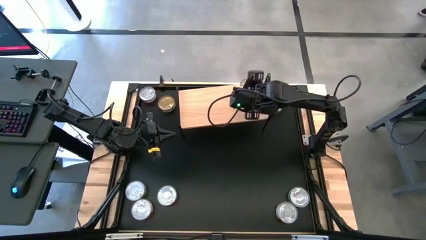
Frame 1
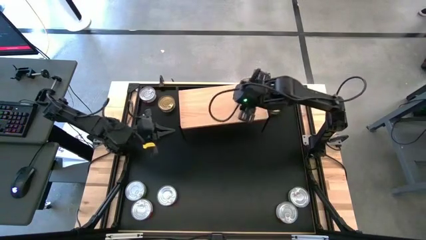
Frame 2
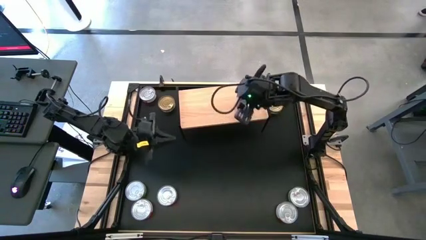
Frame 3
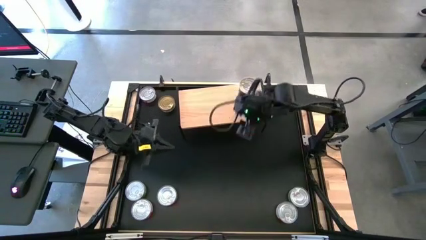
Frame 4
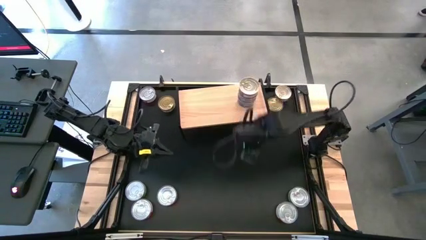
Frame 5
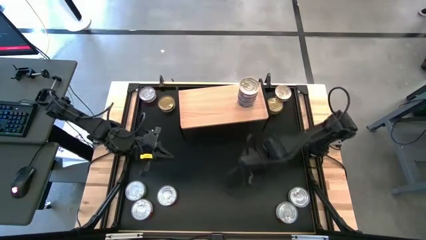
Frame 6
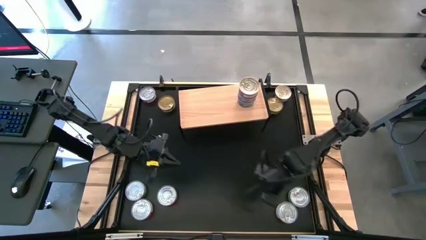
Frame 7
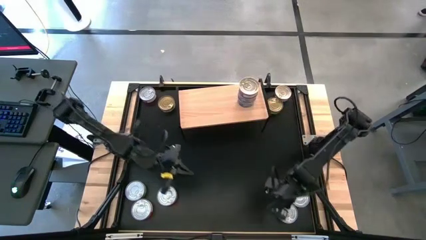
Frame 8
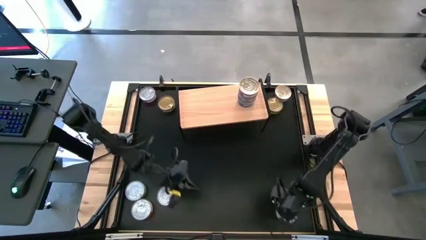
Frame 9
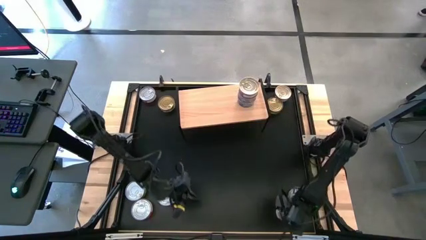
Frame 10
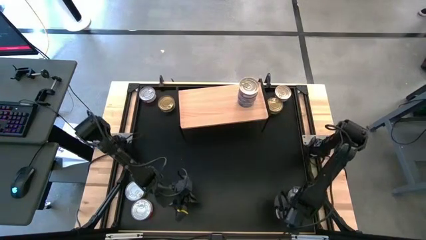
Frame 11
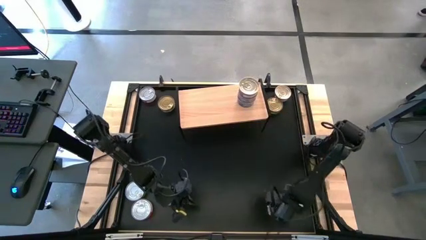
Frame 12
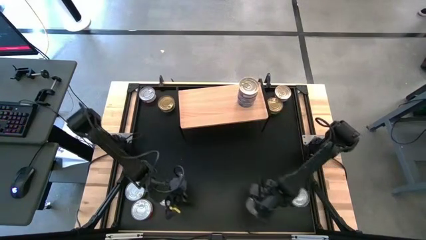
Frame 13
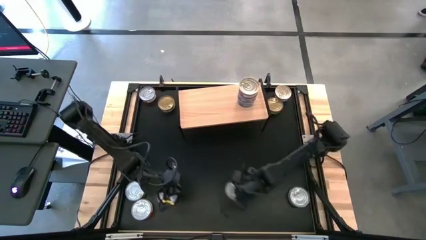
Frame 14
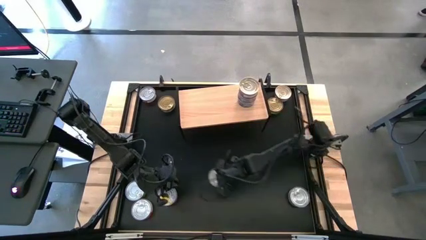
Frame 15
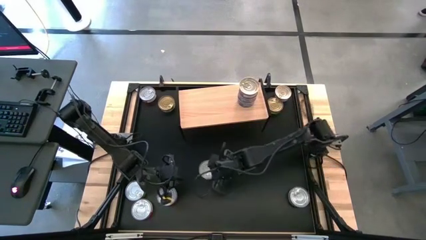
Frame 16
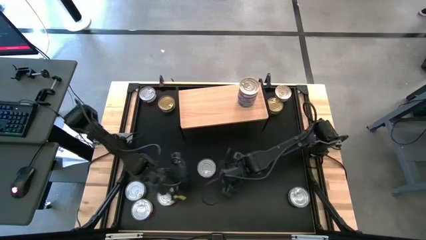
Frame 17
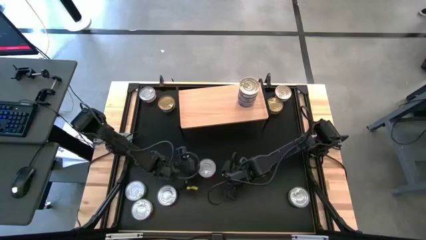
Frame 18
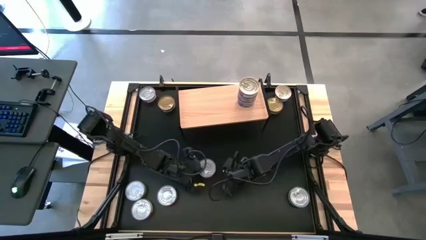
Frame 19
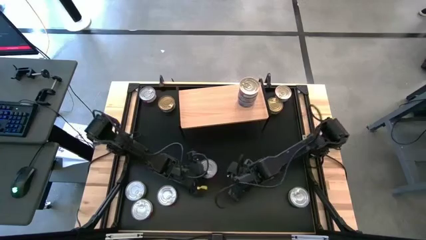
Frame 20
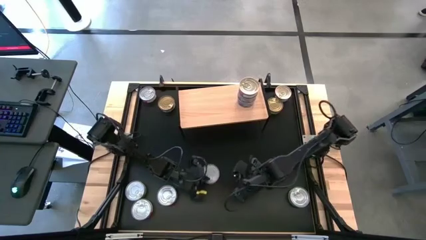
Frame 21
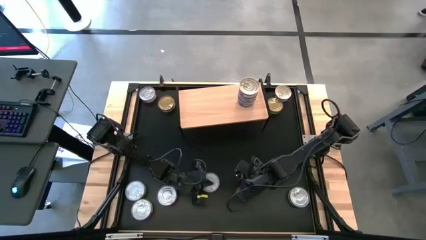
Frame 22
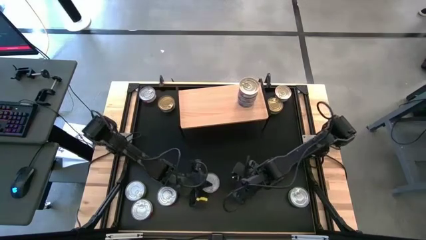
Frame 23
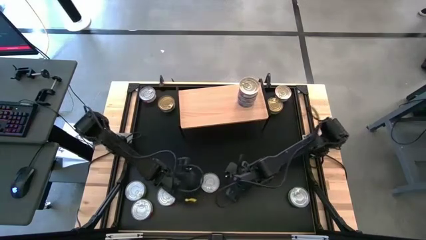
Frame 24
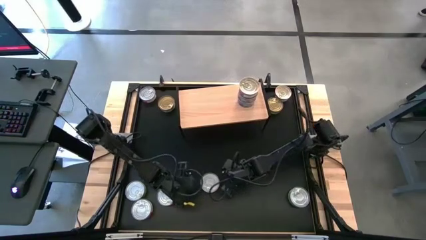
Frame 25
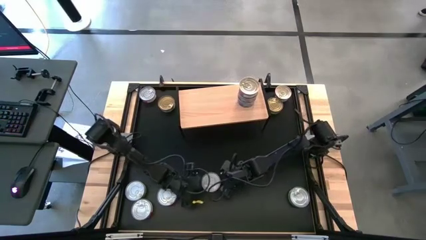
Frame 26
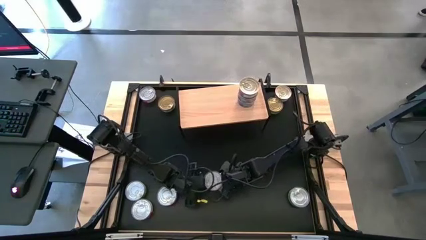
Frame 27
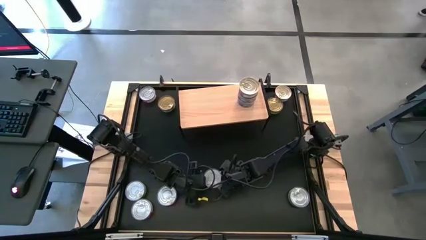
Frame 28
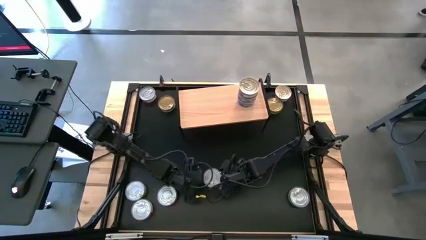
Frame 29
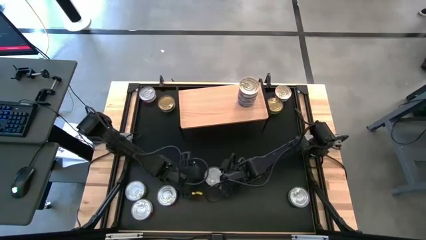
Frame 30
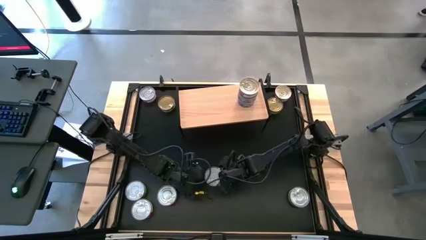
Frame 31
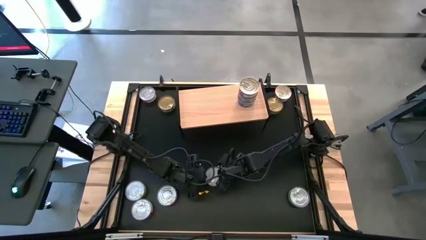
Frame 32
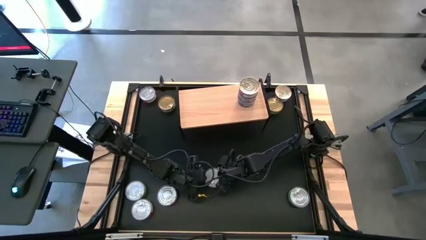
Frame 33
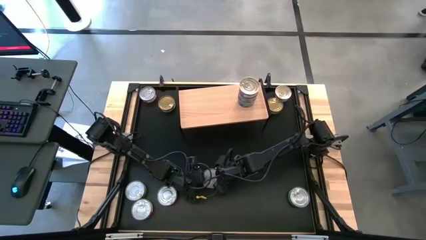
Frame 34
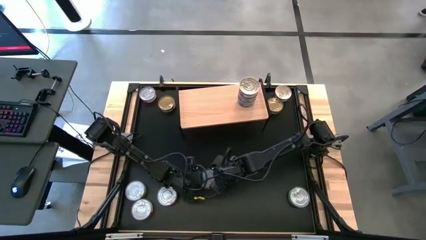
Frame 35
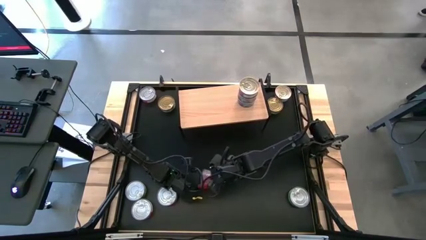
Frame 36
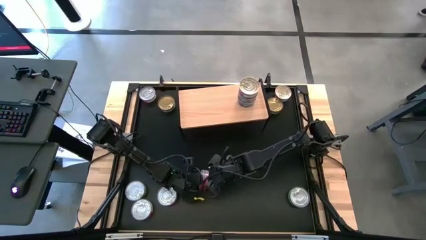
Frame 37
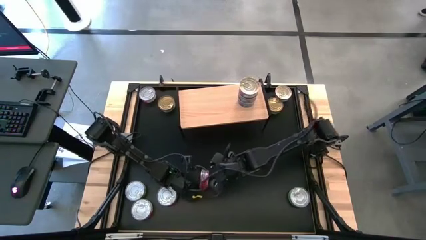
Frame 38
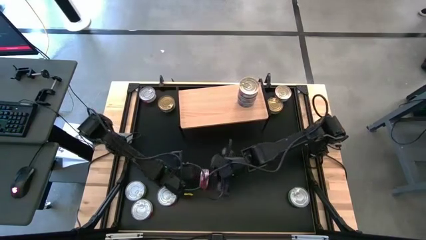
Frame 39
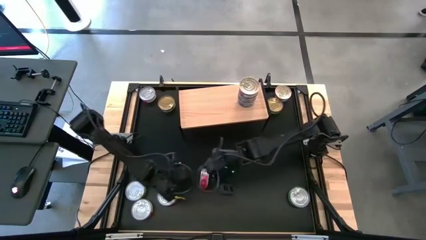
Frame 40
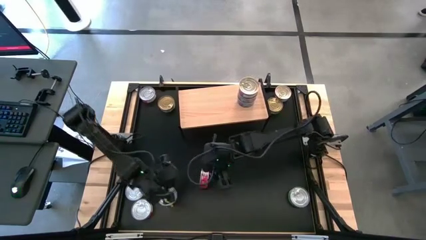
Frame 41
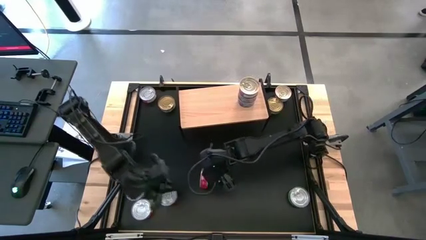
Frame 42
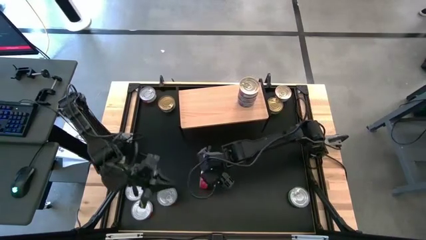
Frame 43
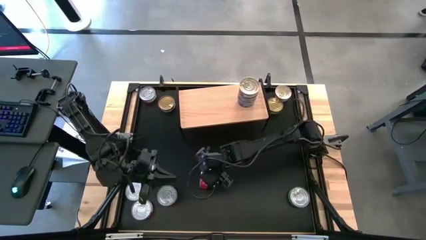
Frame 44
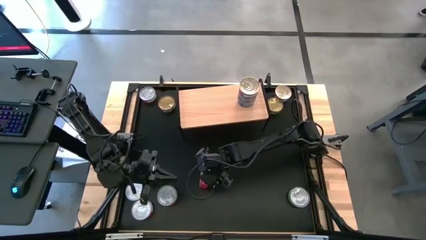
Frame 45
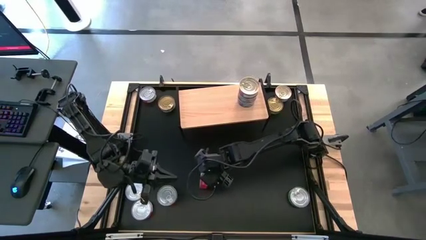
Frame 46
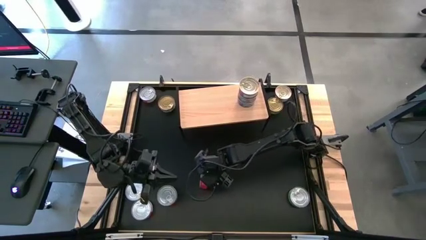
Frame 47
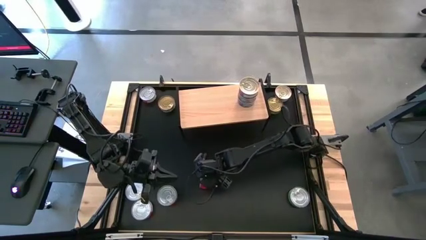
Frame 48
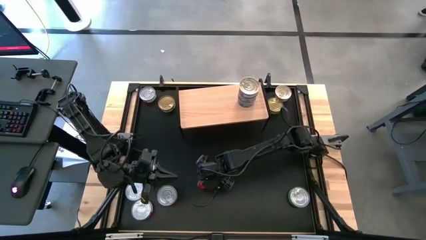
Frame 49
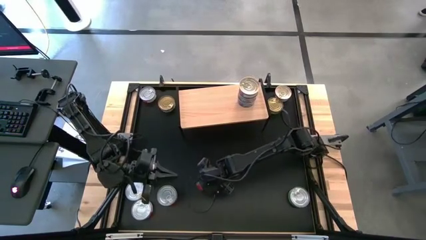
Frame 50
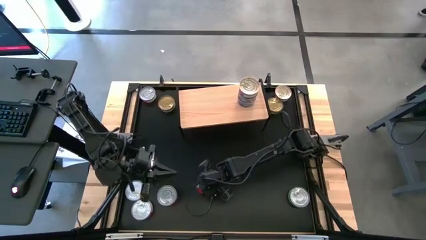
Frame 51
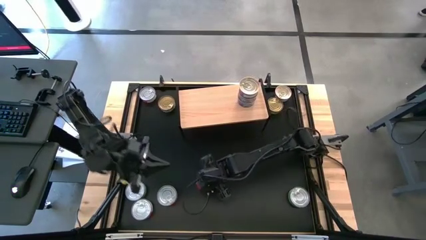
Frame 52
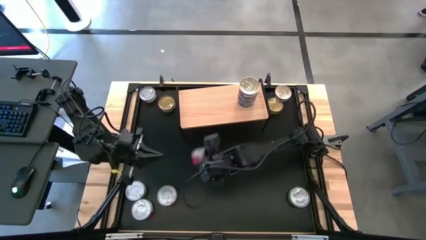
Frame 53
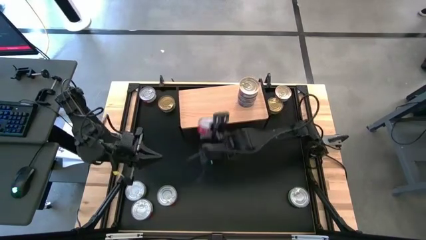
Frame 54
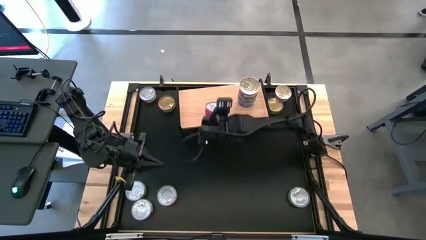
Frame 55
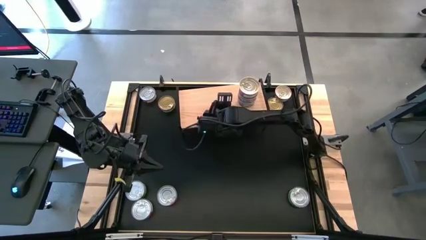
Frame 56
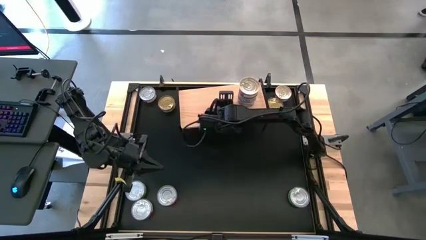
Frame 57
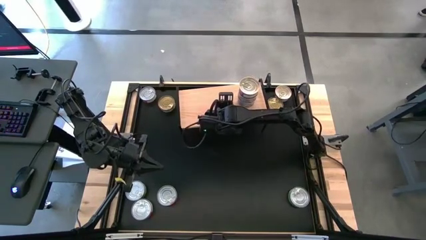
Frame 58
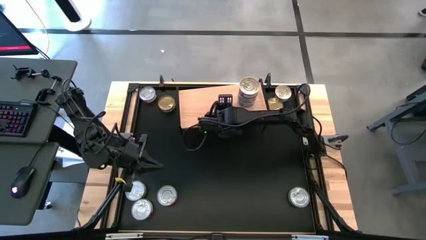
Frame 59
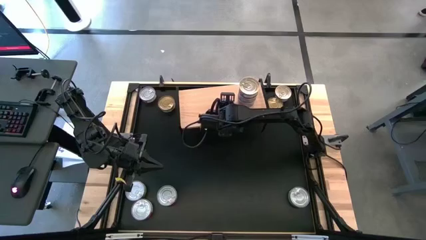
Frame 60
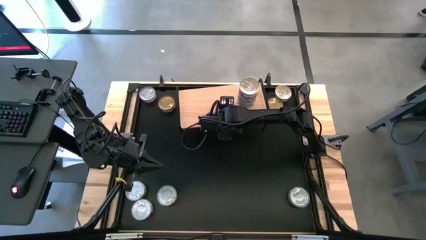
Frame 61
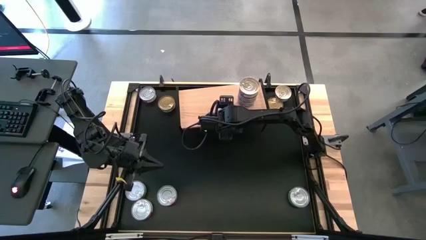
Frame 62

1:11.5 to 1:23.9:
Task: Stack canned seafood by type on shelf
Put the red tuna can on the shelf
